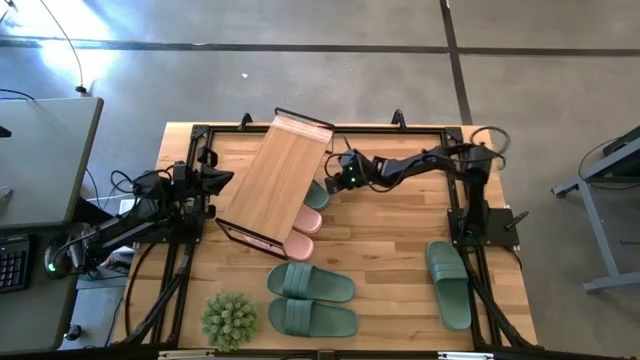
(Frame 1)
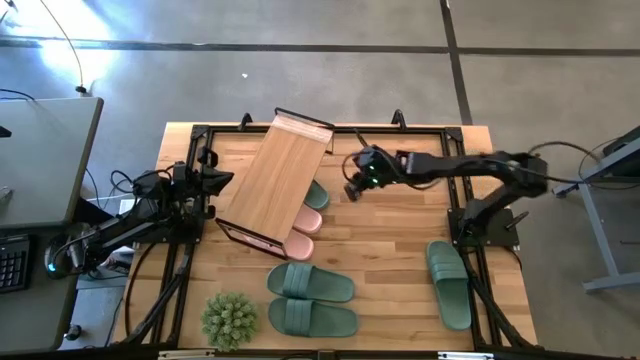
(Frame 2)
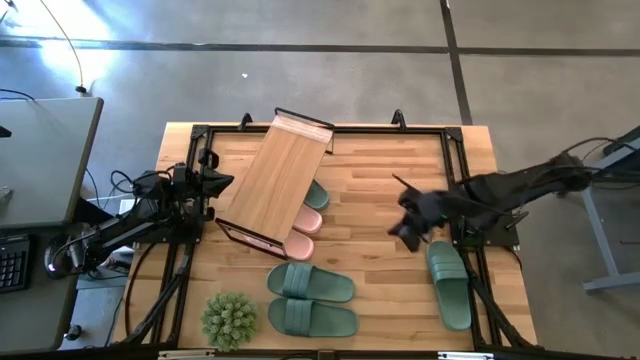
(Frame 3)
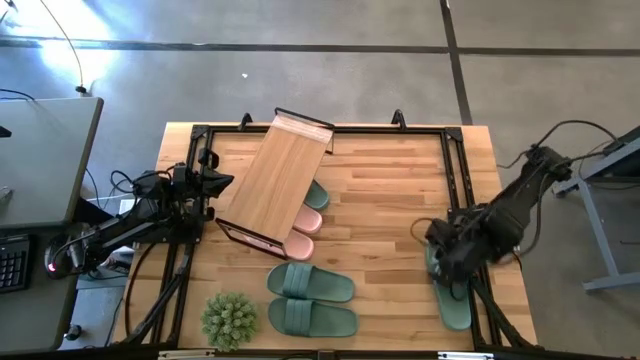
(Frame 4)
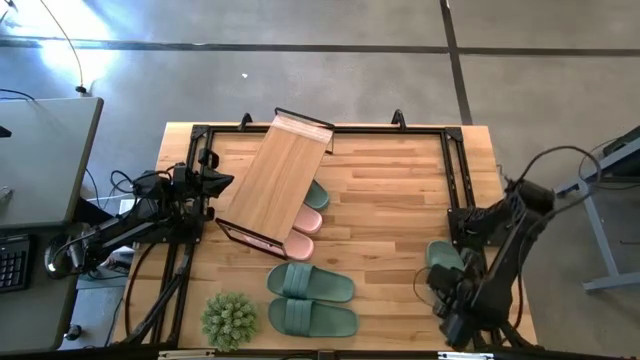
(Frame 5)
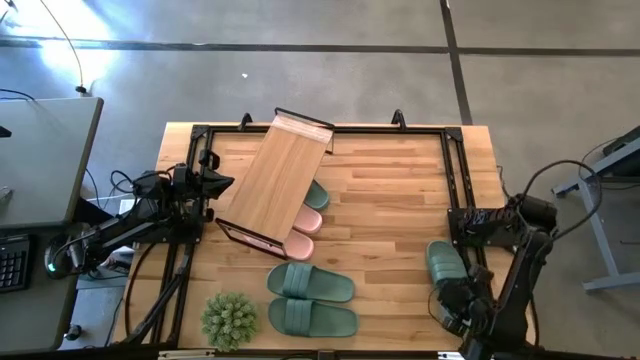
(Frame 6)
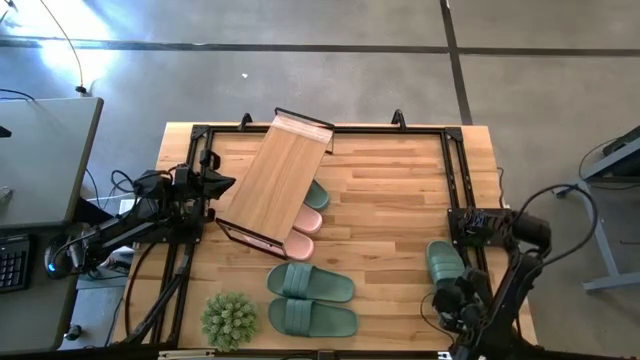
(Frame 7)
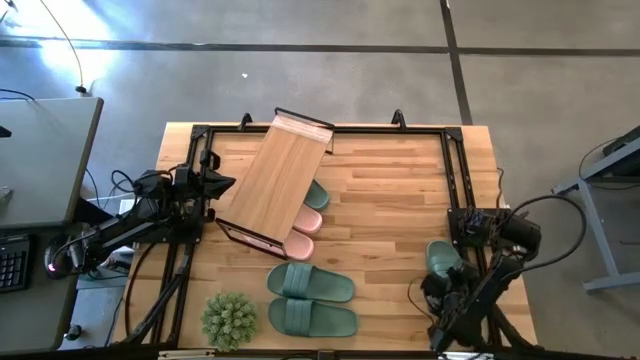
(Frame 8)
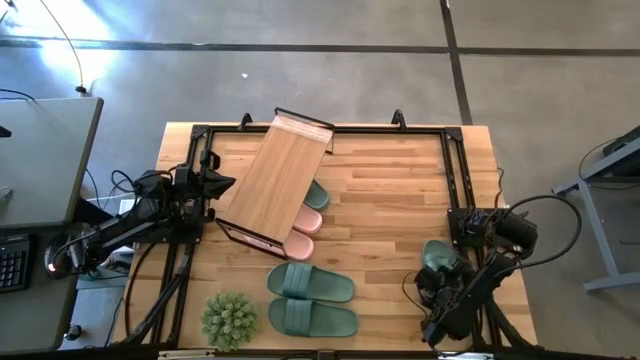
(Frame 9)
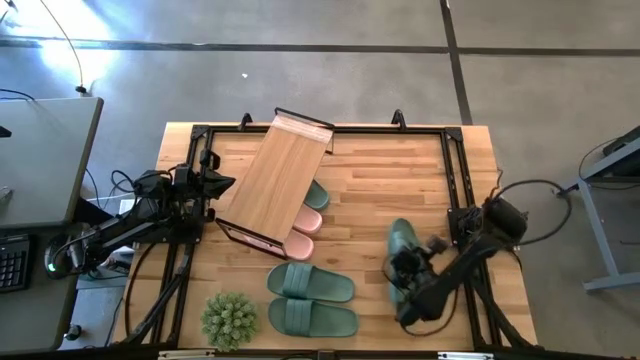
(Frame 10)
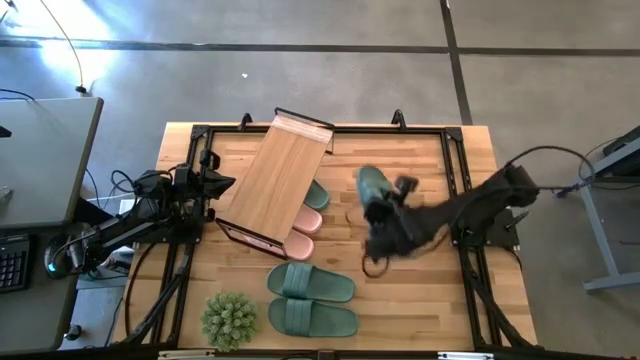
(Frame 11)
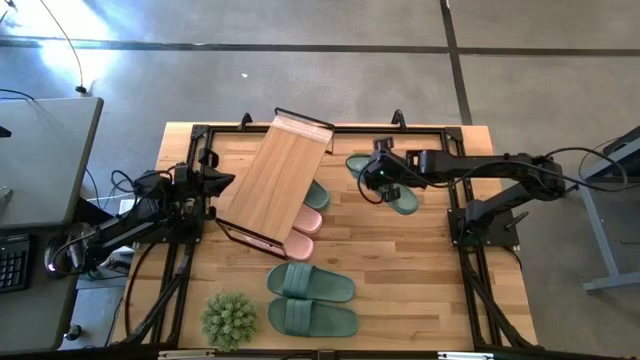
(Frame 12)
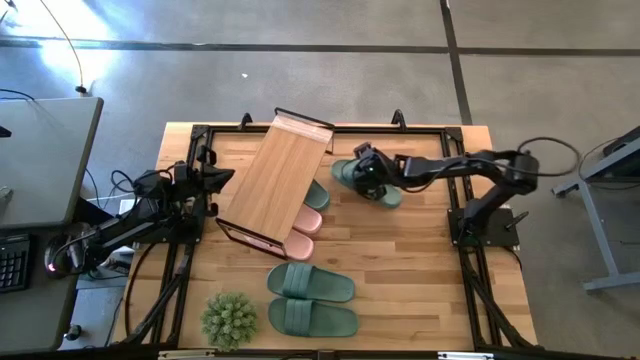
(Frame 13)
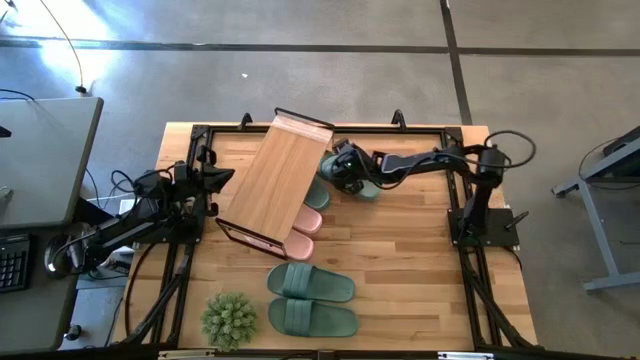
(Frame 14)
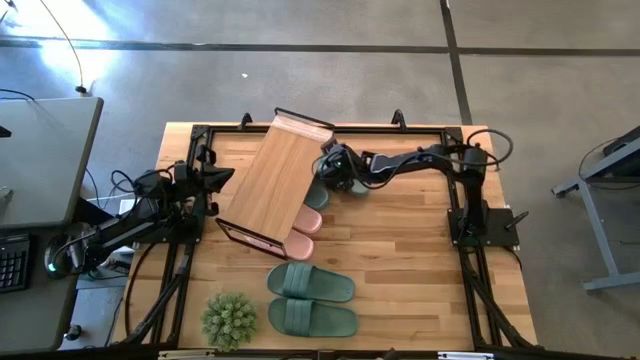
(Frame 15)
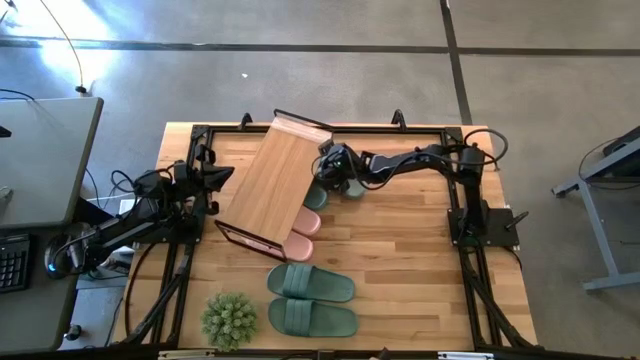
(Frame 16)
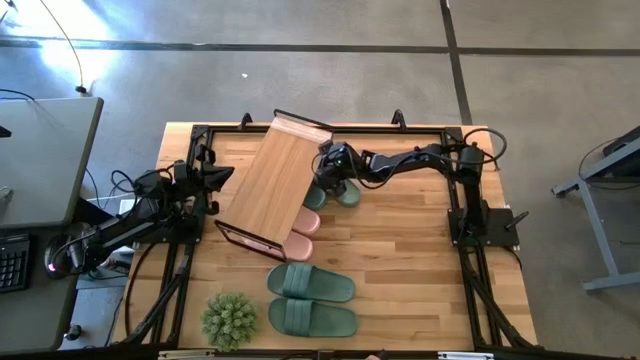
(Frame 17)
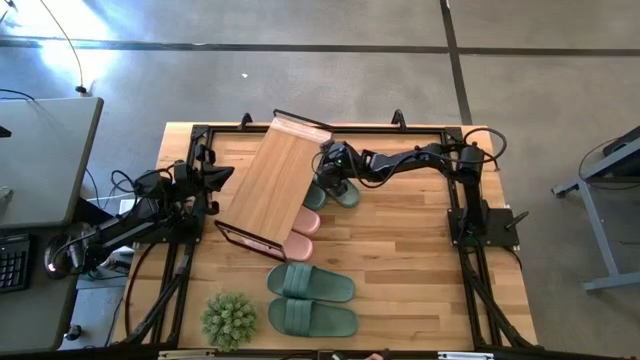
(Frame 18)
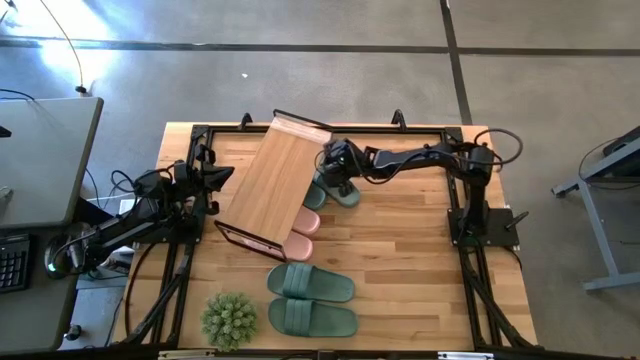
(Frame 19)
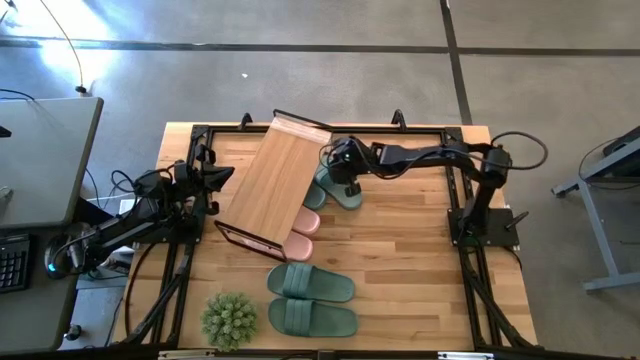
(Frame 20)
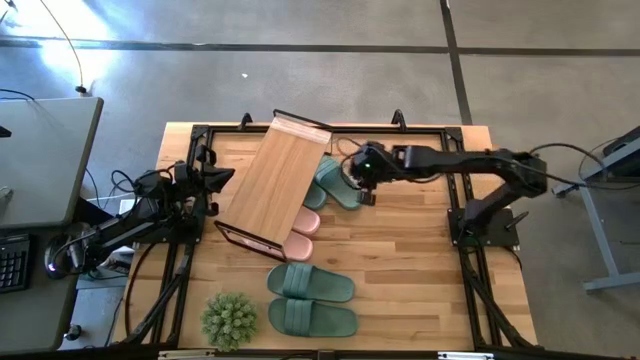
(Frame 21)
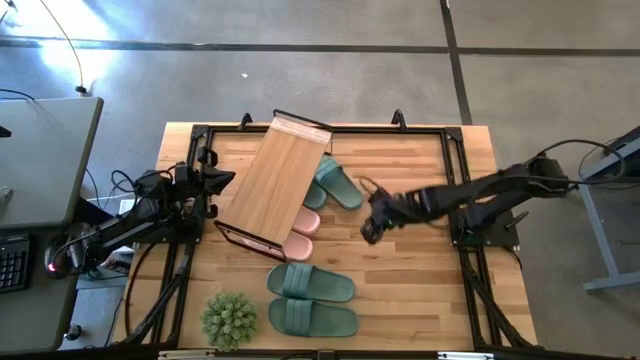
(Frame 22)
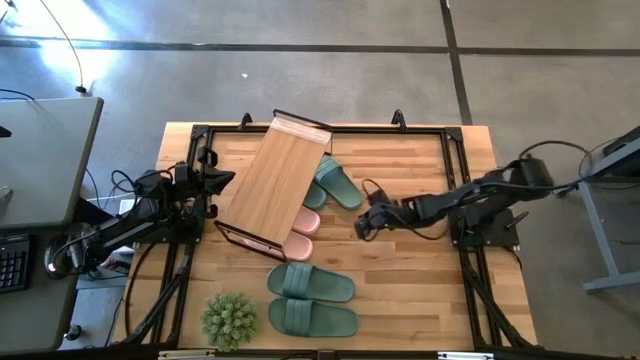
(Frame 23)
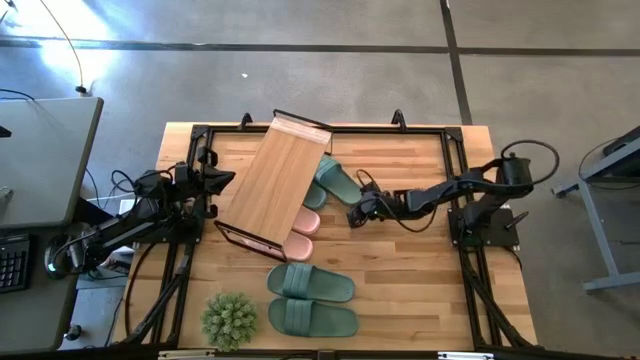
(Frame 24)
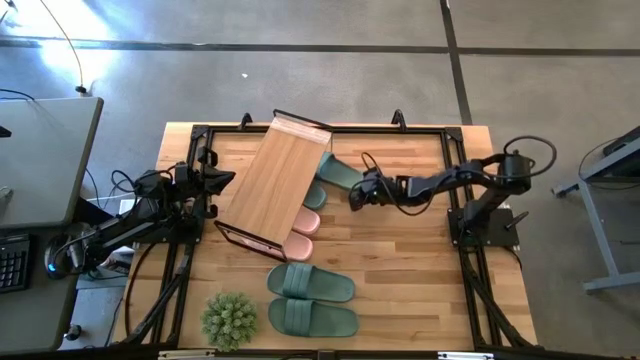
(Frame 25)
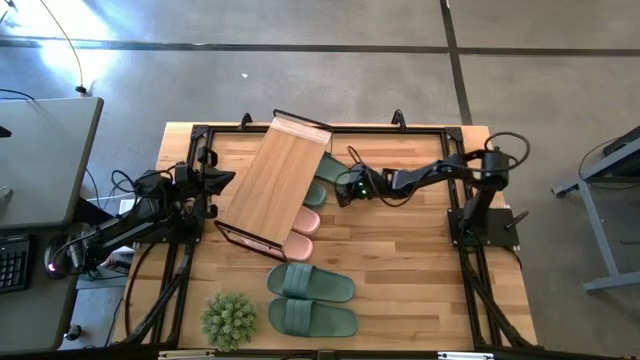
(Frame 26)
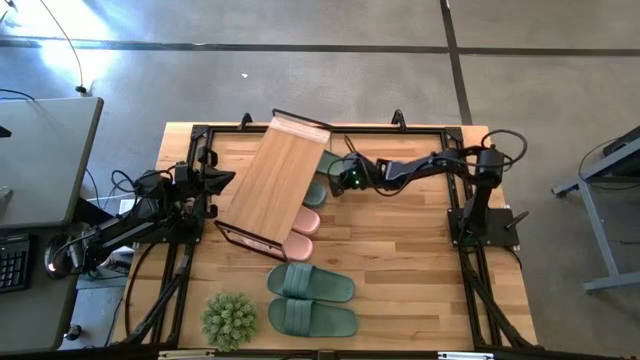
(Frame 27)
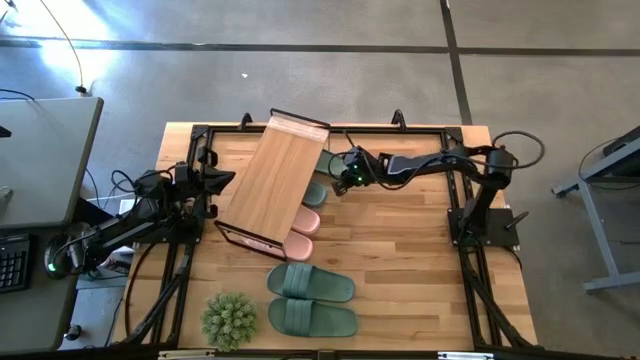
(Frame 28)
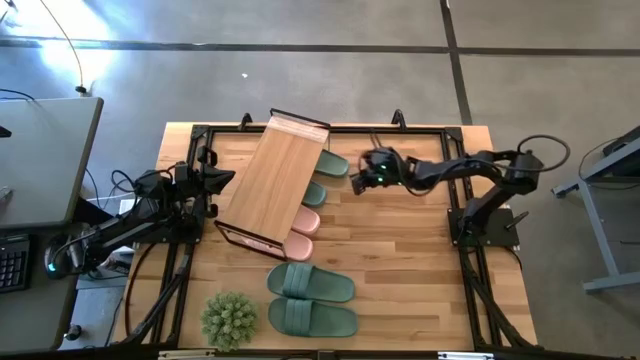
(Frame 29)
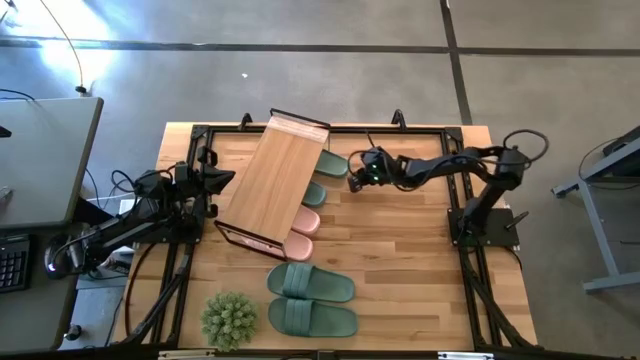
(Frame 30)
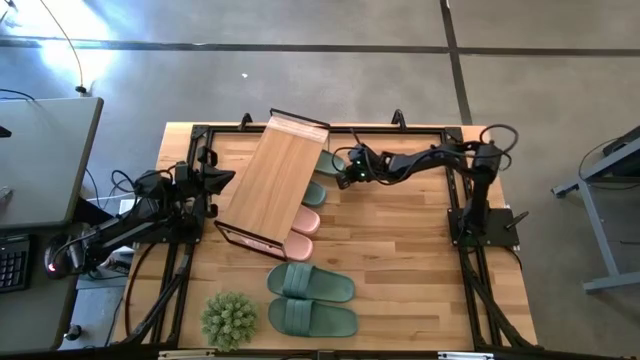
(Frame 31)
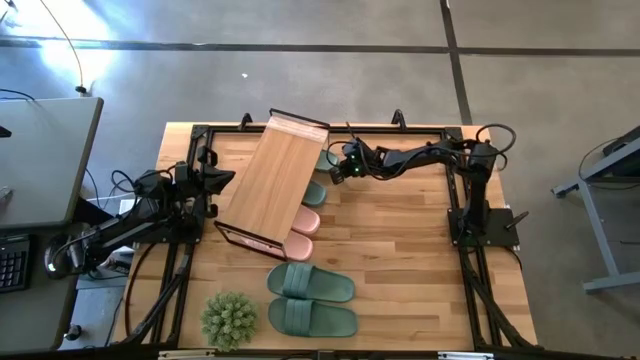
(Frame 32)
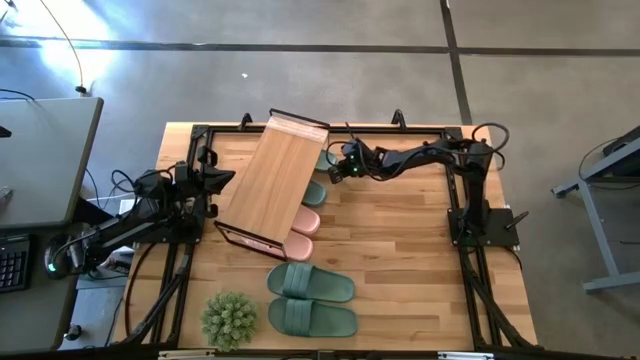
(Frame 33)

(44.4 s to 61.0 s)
Task: Pick and place slides into the shelf
Put the green slide under the shelf
